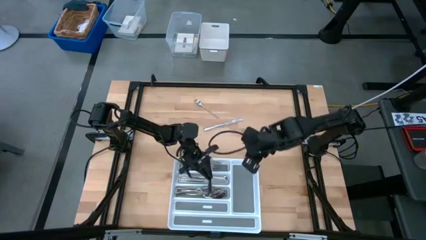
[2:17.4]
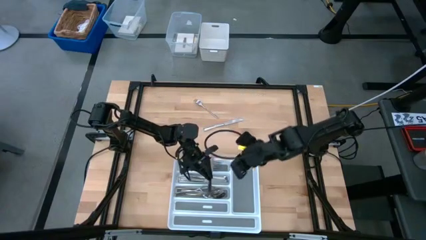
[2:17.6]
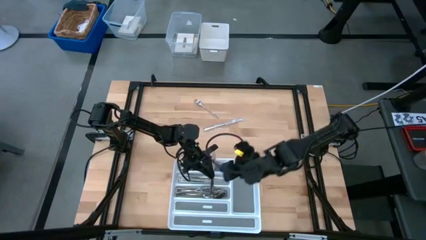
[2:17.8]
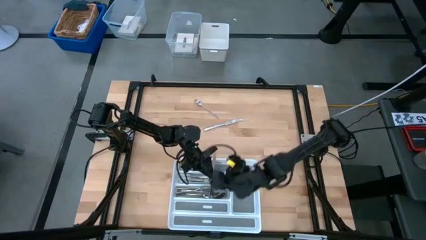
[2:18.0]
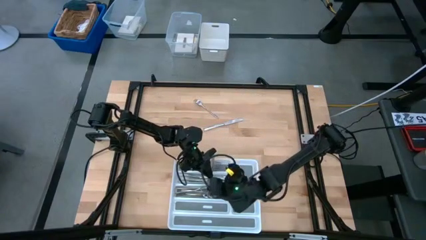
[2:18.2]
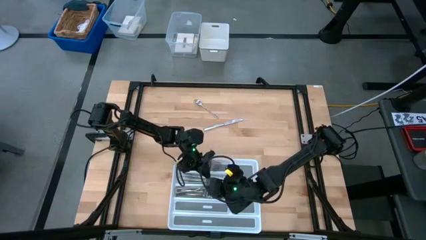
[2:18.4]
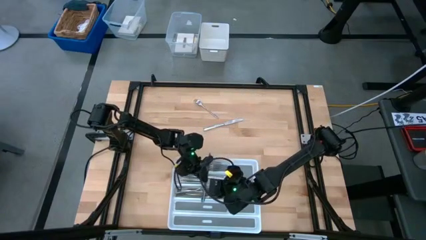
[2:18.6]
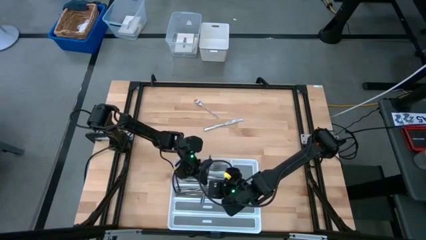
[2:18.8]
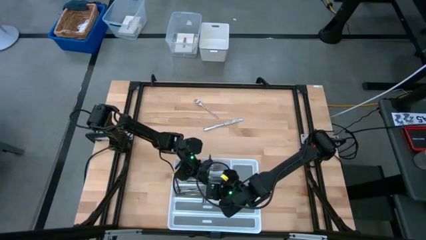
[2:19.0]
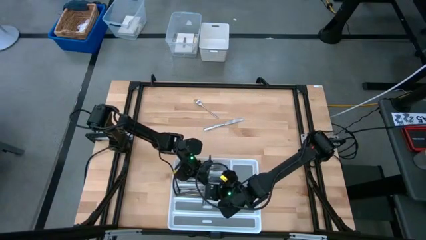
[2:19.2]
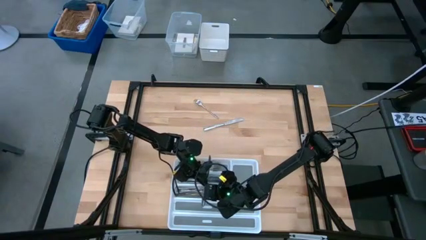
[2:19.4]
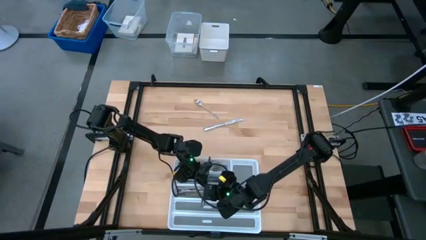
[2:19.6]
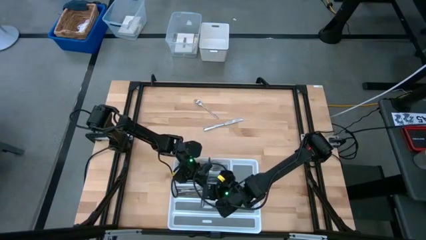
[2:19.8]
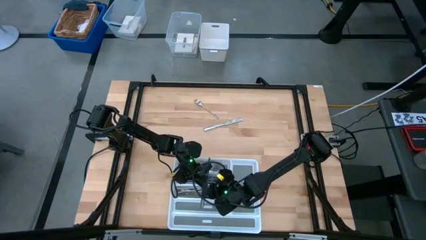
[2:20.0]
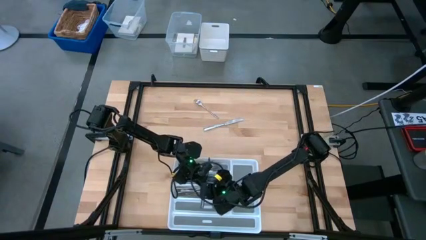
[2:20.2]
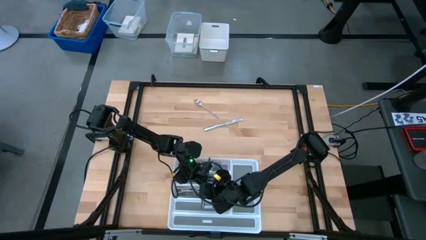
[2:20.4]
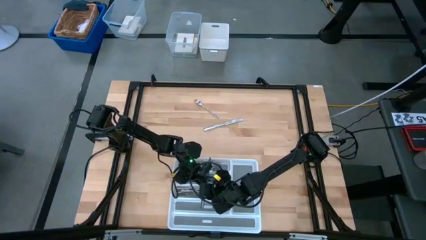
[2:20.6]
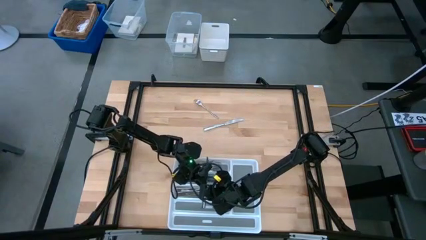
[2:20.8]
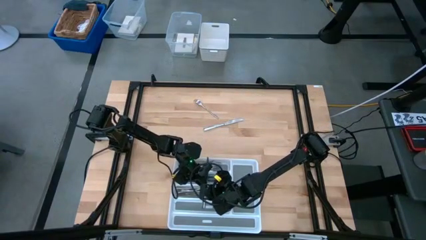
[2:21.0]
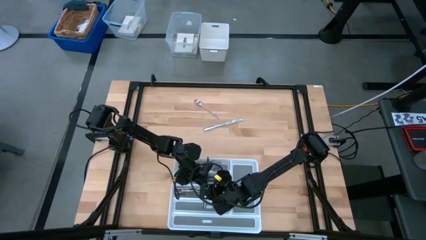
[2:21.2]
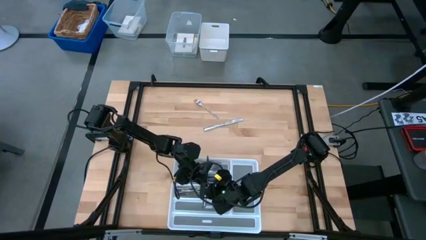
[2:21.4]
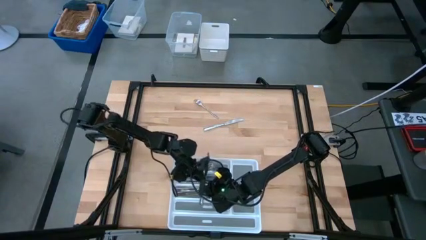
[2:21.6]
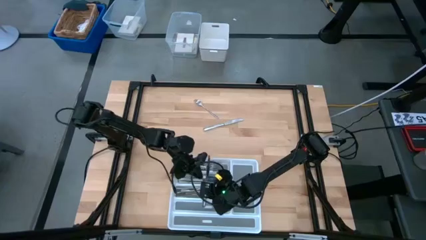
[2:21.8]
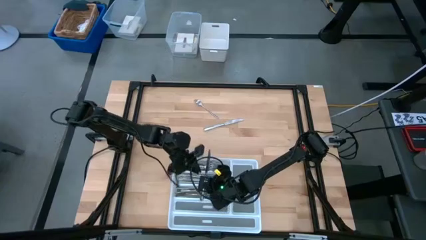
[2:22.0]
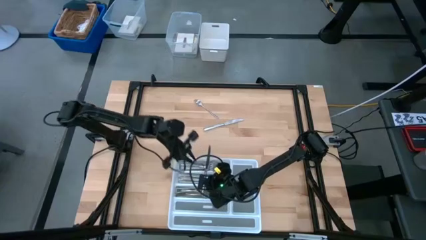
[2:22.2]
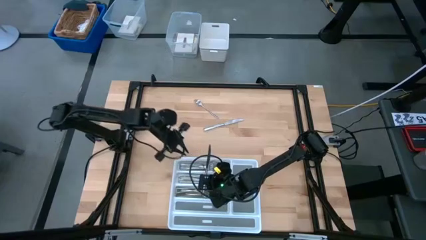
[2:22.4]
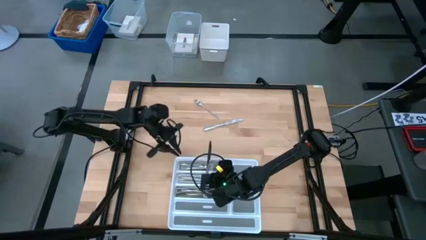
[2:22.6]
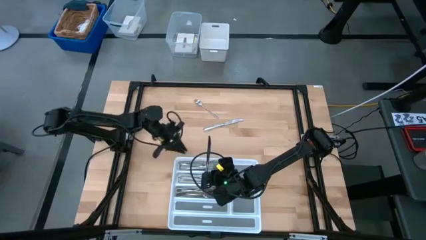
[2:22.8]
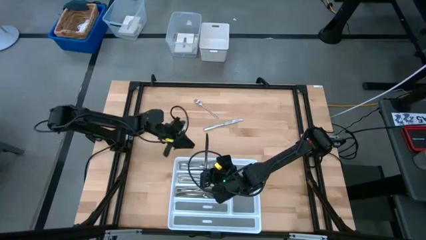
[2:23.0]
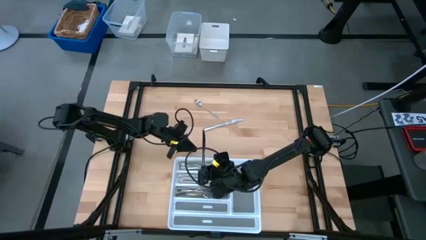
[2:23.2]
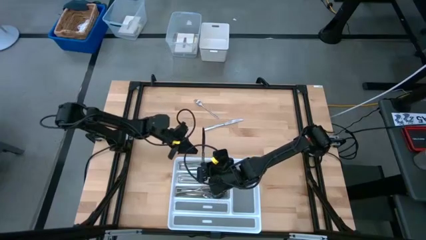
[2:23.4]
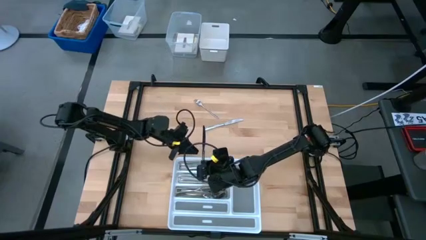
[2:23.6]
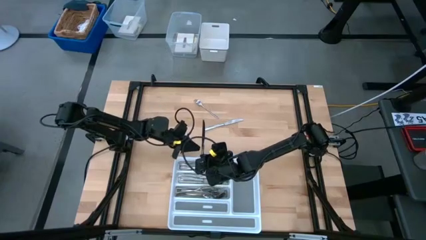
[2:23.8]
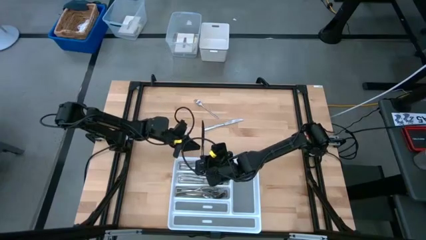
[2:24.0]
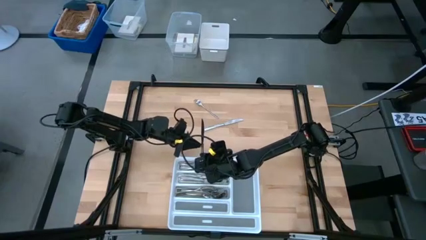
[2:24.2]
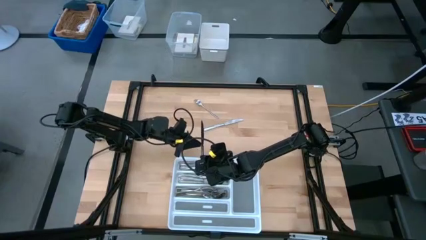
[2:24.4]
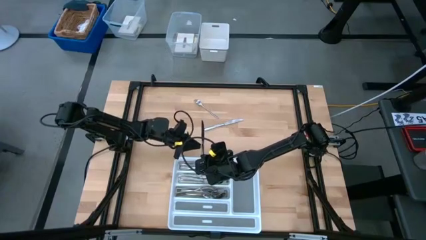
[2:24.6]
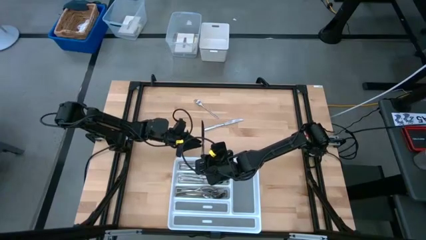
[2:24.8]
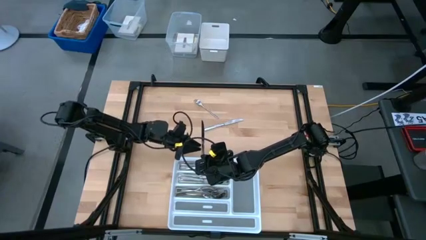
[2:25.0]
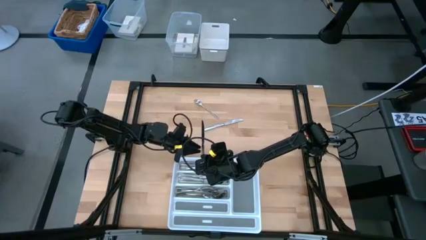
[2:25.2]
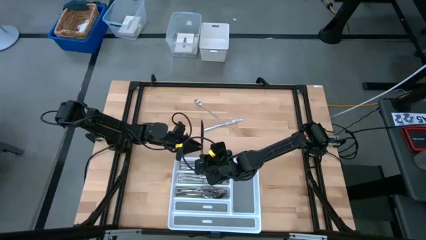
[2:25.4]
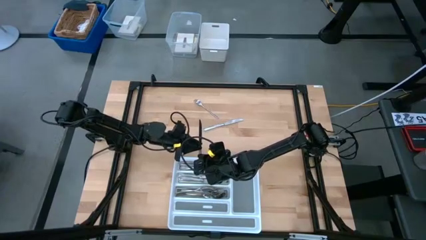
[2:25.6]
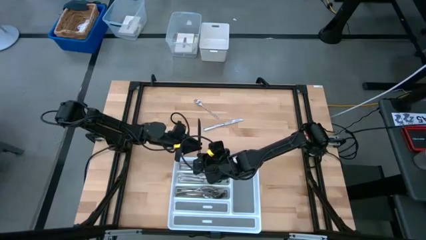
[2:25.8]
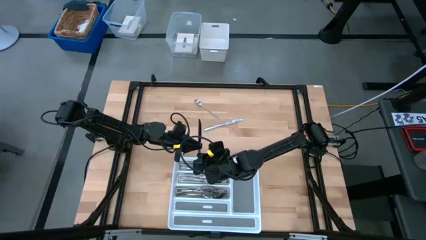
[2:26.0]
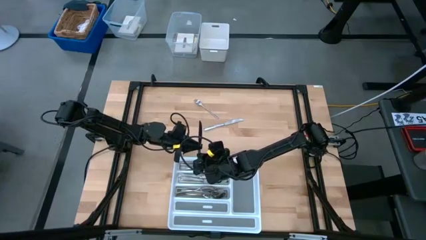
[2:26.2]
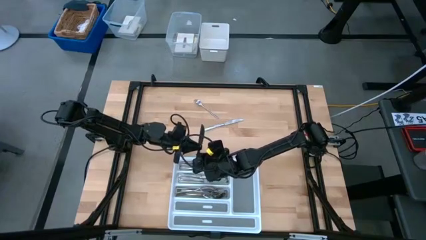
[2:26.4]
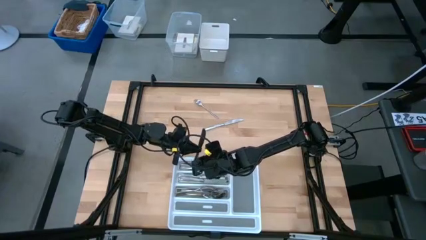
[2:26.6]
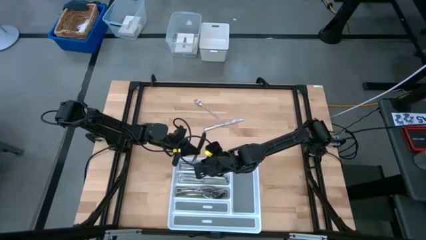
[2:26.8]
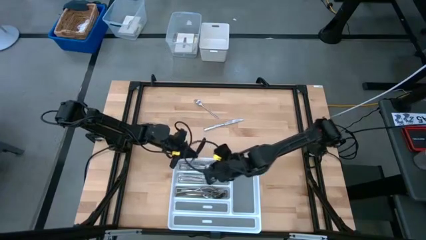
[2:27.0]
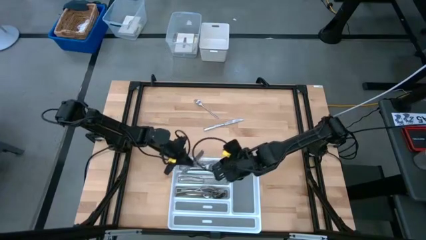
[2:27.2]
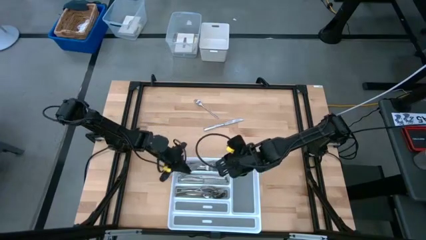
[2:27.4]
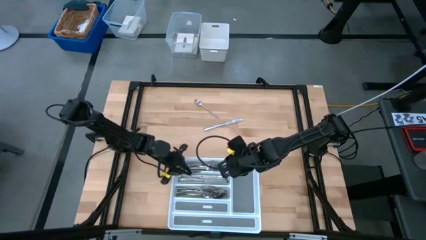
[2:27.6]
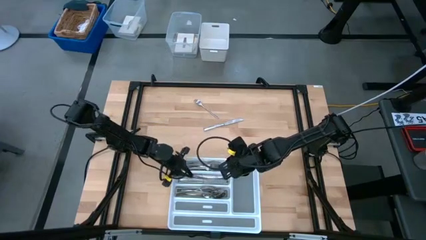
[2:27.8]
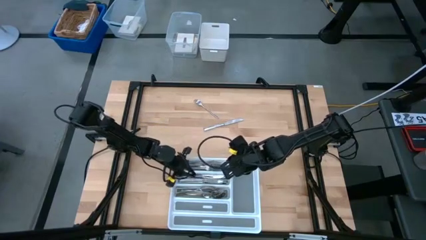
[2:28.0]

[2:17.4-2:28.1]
Task: Sort silverware
Put the silver knife into the middle section of the white silverware tray

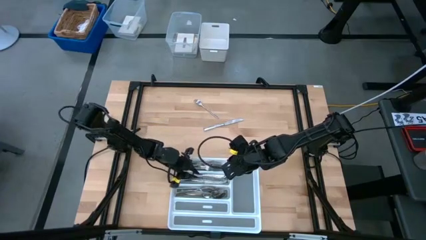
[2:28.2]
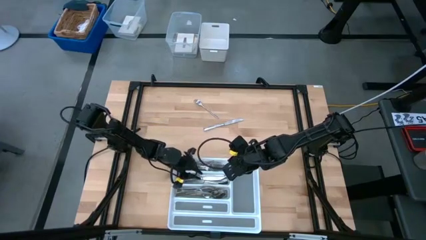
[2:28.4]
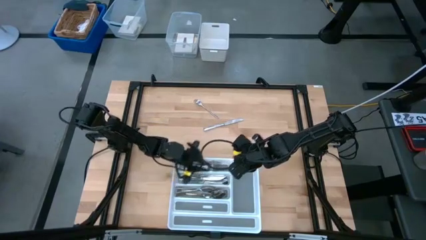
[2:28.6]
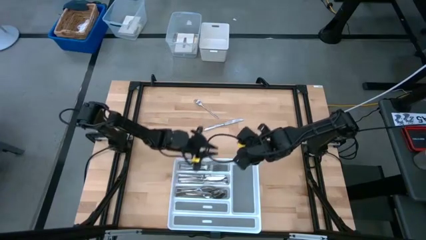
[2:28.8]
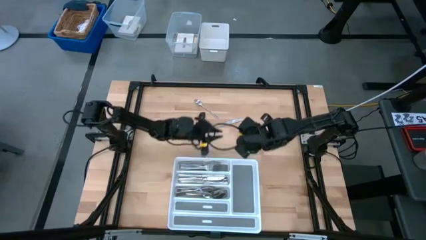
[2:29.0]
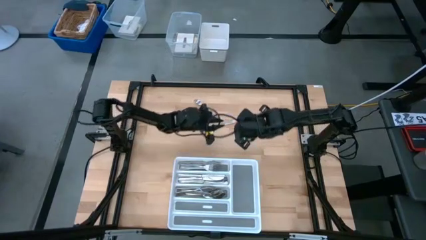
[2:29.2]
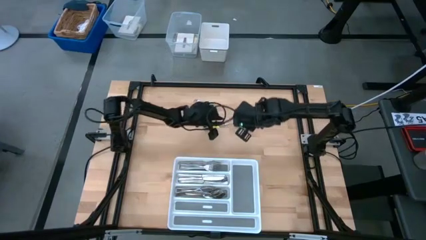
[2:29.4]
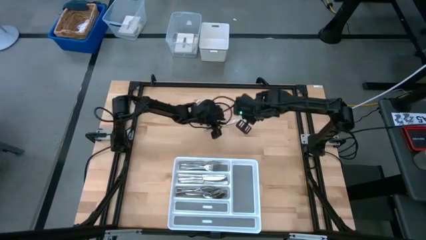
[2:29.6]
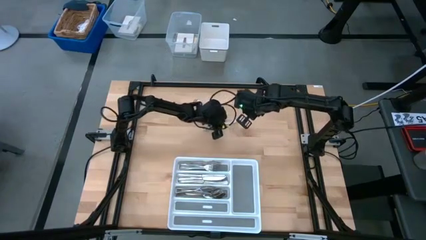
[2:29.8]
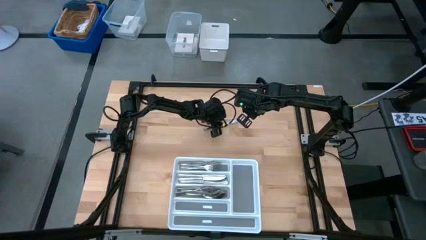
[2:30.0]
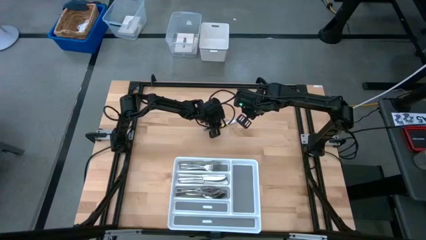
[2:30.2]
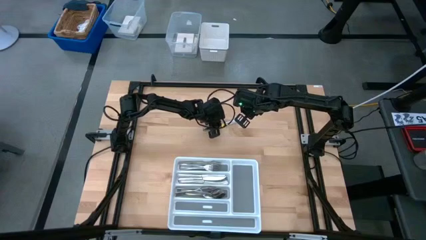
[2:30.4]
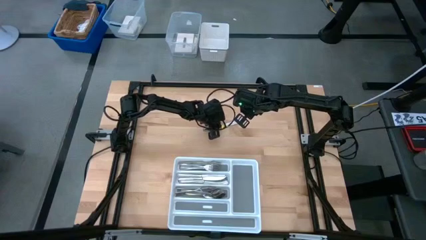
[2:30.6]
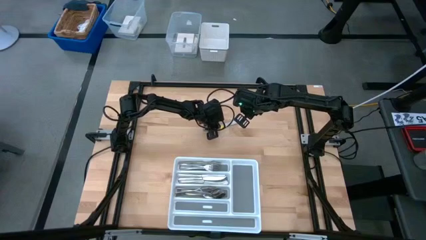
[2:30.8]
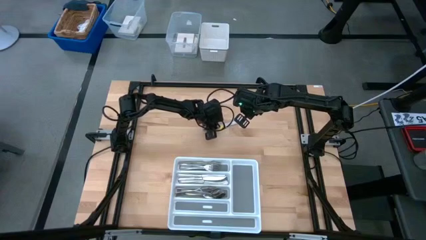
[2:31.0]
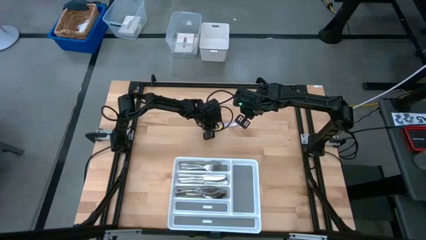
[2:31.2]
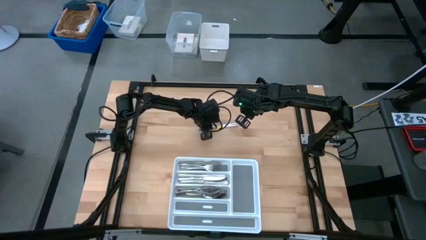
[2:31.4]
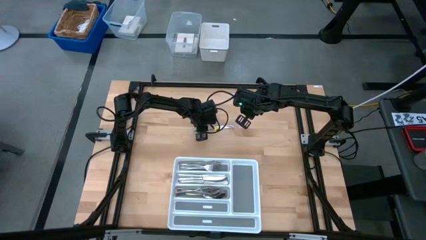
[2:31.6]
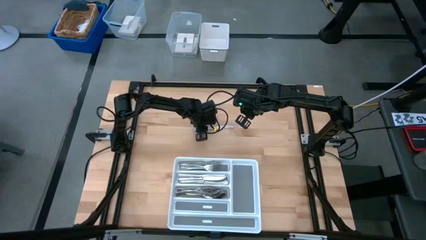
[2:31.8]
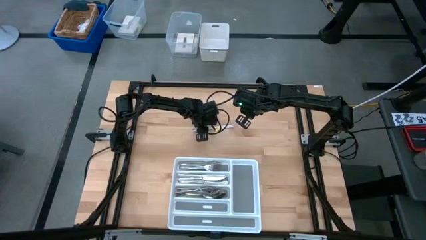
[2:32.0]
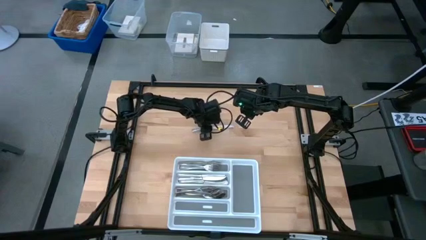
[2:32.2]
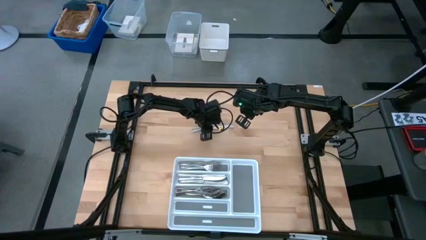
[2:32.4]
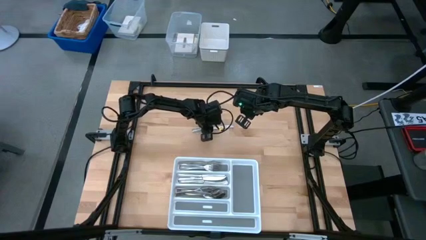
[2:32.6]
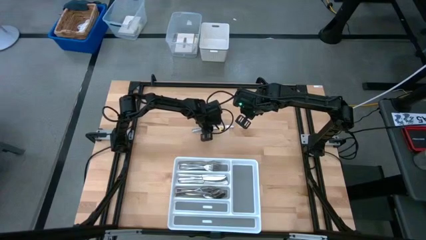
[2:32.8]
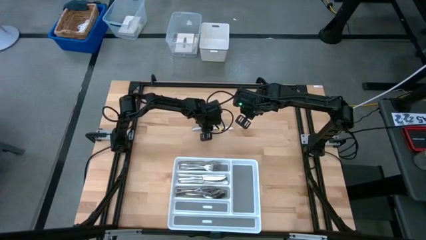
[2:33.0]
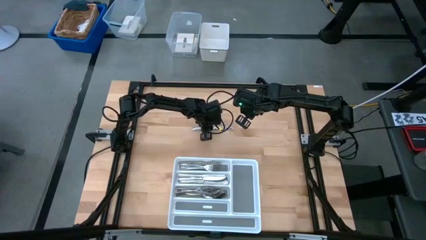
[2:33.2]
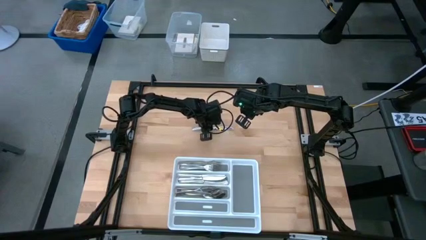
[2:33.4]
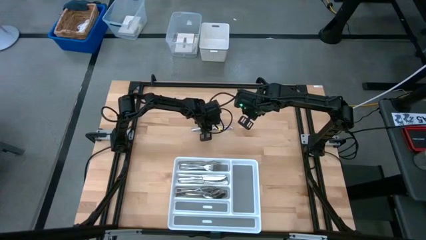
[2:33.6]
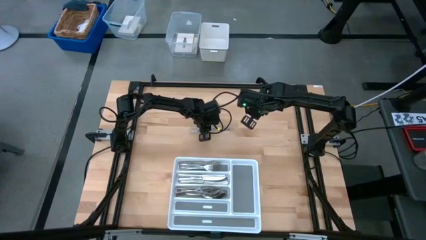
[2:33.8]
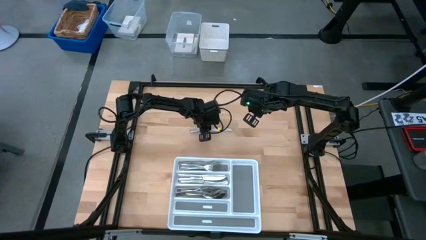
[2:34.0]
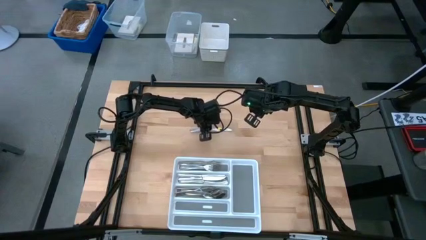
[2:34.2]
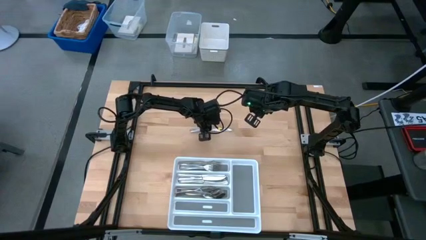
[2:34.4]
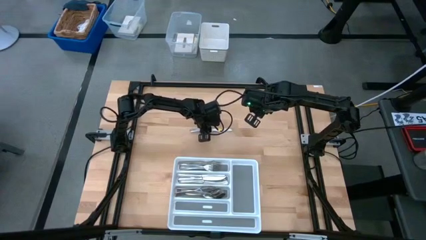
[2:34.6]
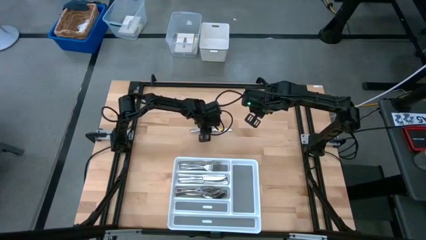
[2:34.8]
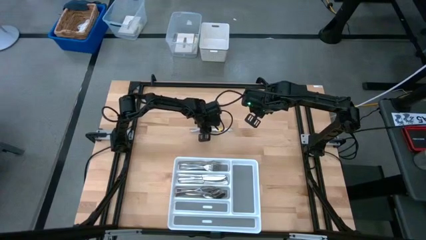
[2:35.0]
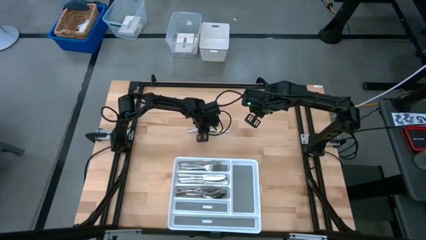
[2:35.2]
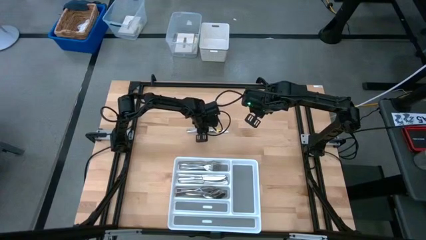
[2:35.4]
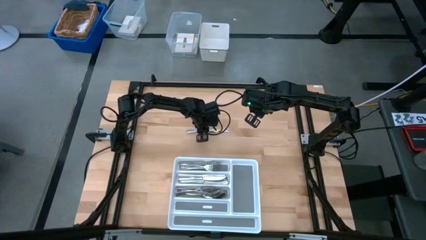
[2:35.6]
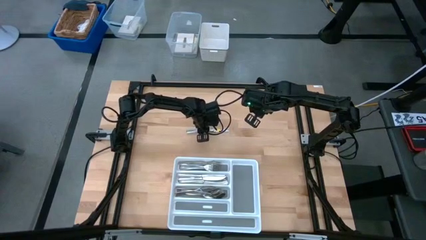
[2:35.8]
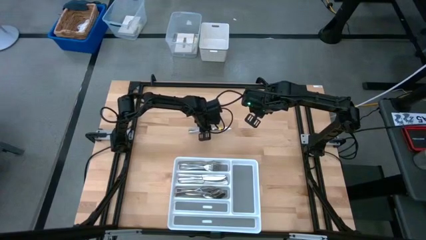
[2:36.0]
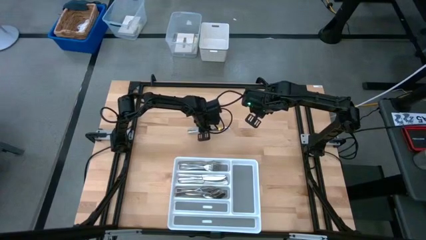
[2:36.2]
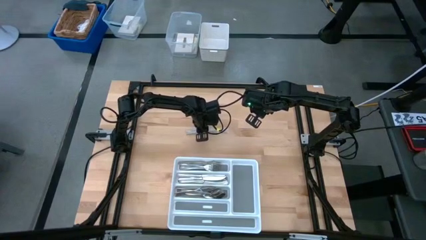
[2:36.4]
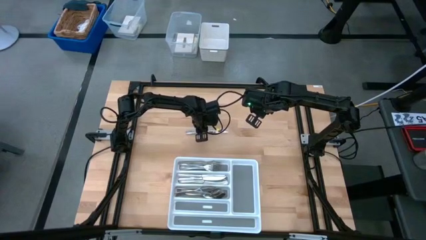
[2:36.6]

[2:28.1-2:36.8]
Put the silver knife into the middle section of the white silverware tray
